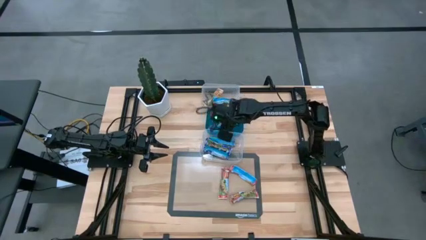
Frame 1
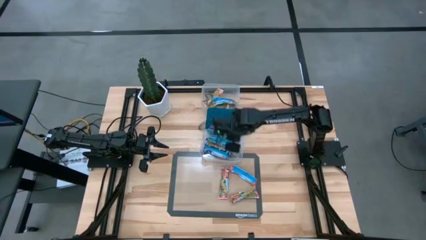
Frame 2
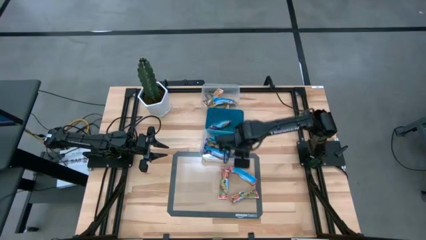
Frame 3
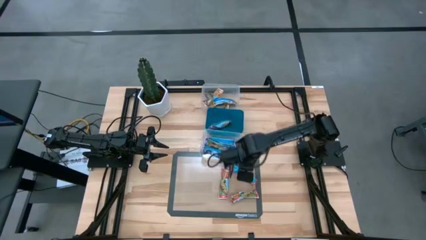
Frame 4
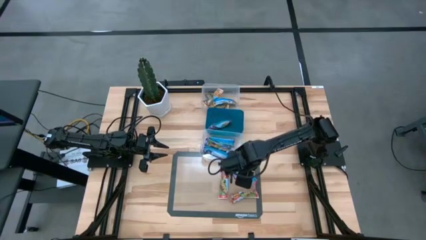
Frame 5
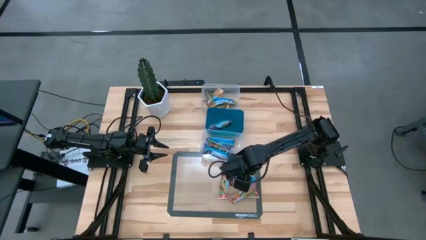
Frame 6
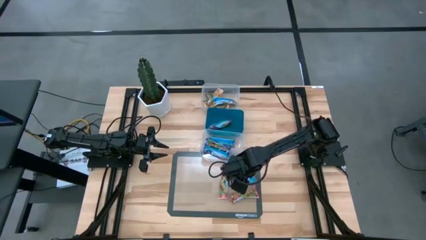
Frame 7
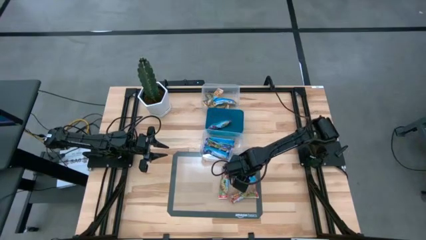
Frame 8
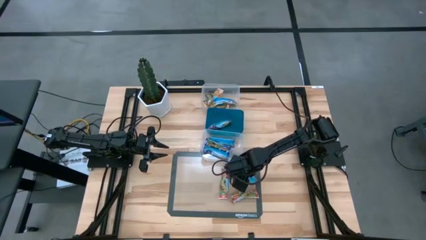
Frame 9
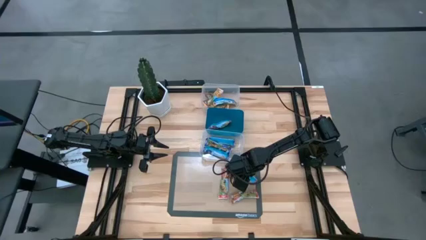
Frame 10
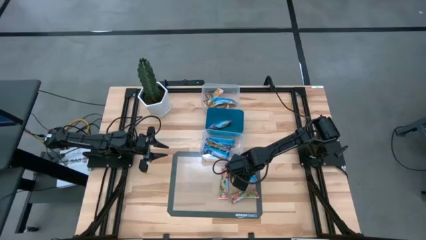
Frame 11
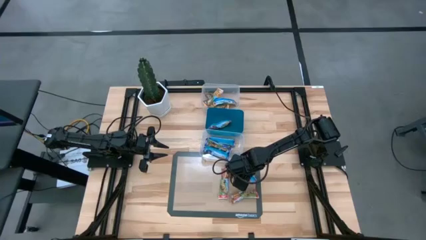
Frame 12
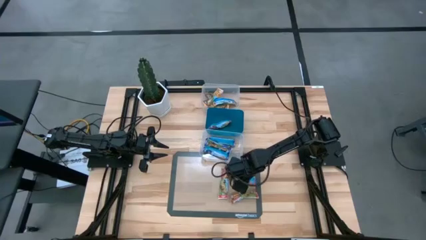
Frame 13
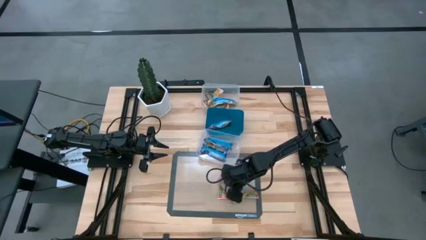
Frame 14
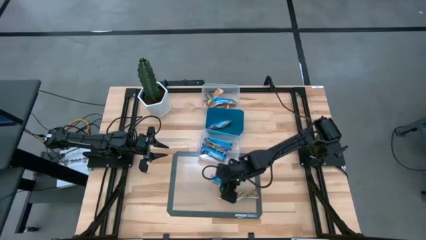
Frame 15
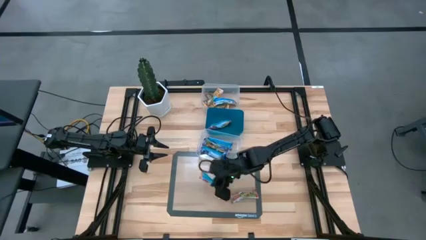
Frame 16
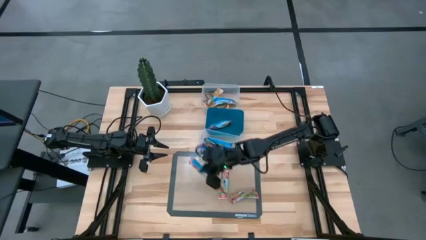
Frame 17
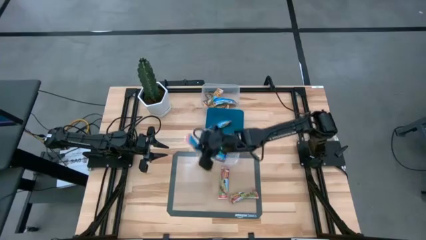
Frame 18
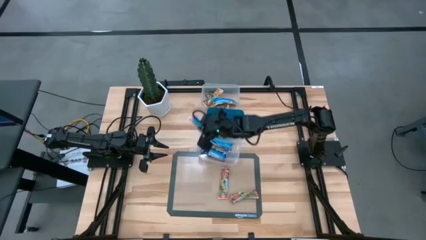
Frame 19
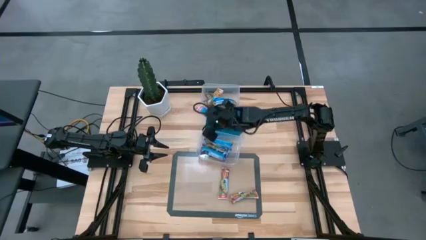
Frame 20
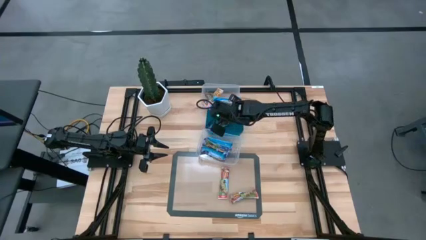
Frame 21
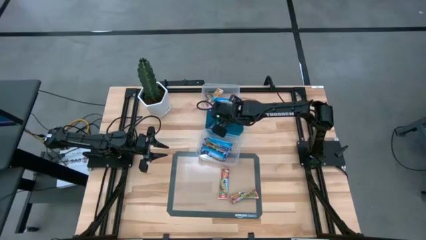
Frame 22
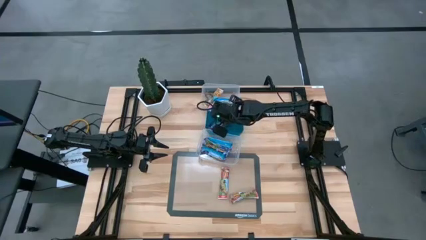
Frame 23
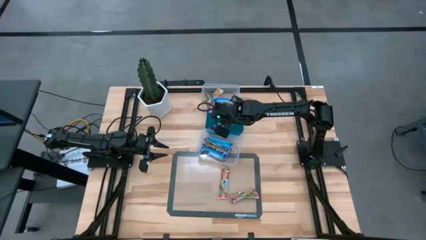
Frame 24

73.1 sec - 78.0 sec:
Task: Pick and place Granola Bars by type
Put the red granola bar into the blue bin

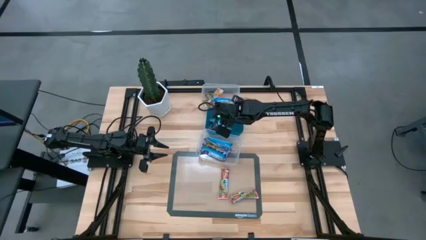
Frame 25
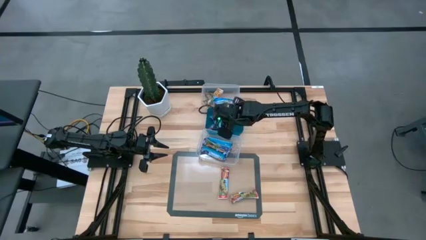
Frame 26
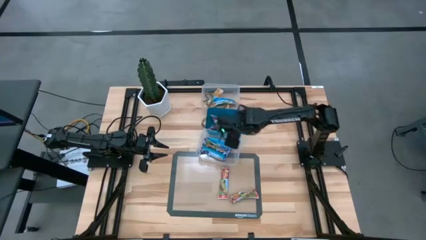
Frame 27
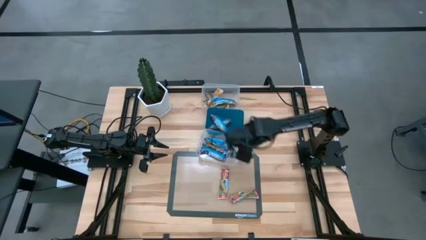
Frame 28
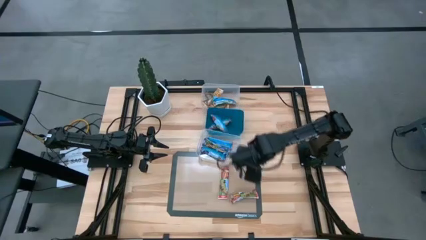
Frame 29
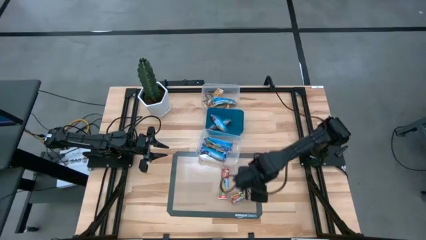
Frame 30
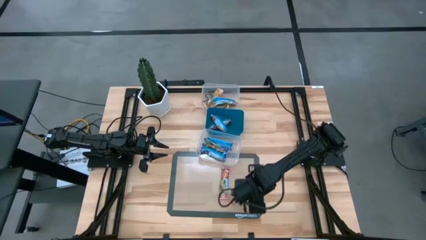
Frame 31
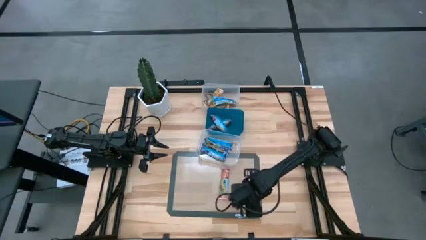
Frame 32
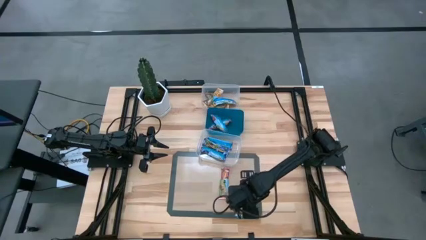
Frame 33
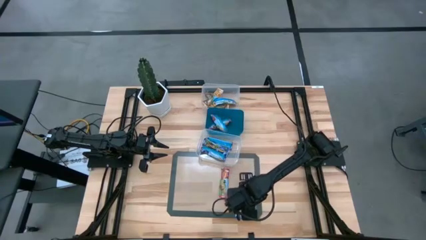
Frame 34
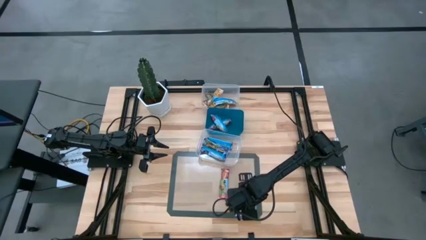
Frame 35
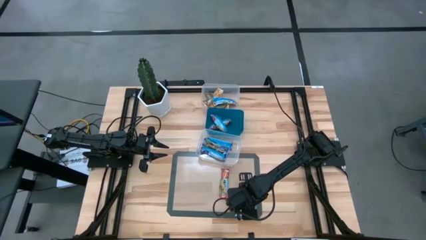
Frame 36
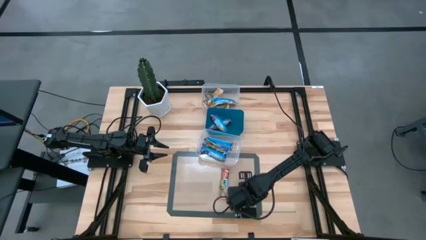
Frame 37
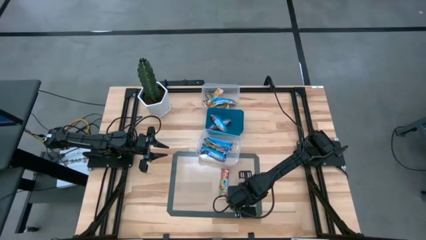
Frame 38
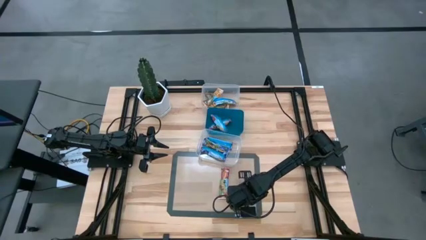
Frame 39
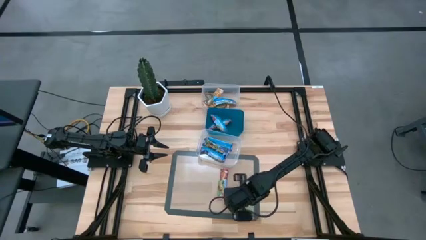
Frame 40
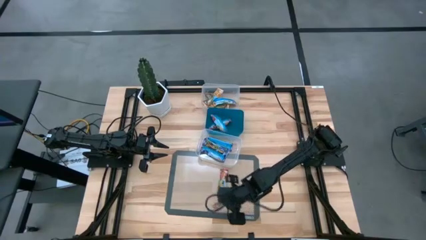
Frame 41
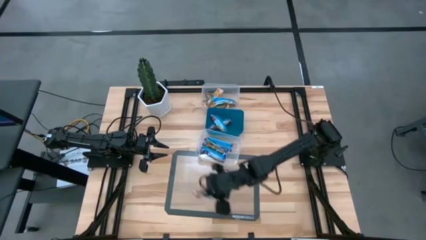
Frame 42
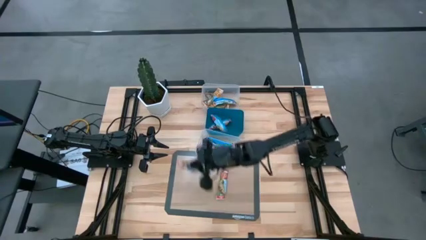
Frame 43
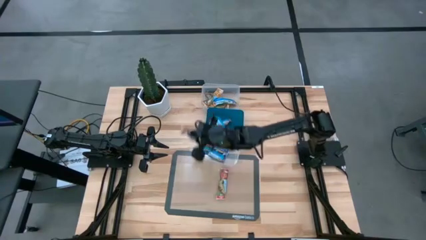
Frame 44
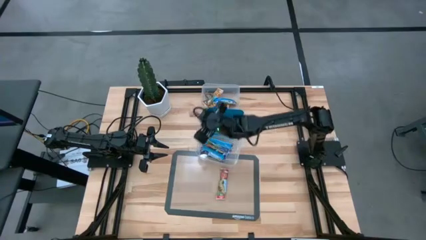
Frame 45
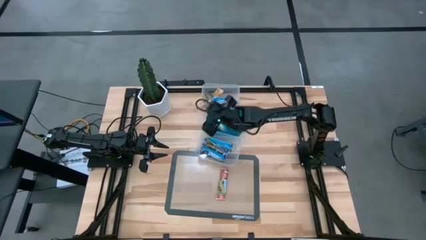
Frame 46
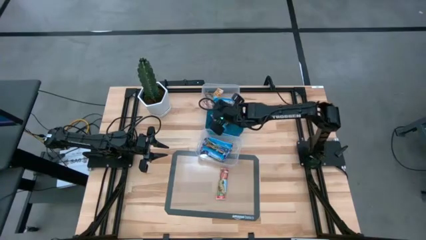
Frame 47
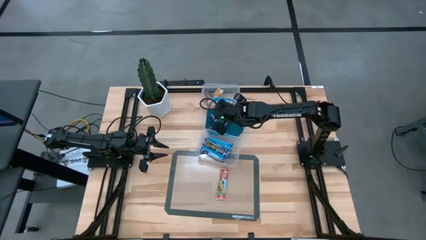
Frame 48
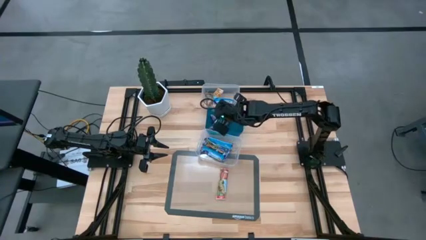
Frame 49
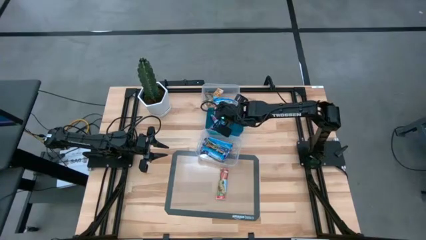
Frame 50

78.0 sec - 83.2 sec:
Put the red granola bar into the blue bin

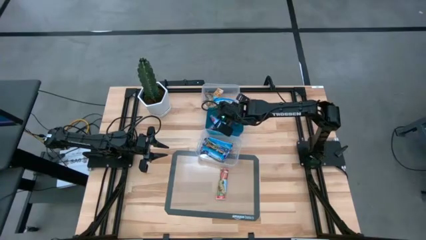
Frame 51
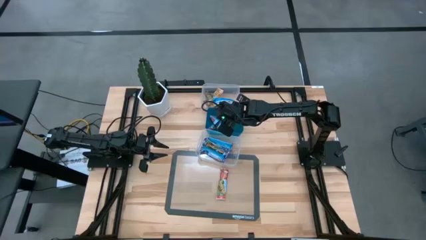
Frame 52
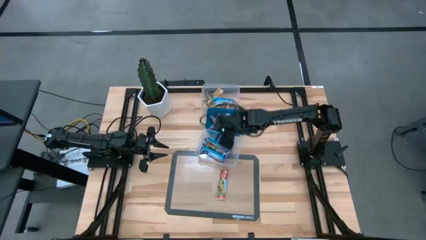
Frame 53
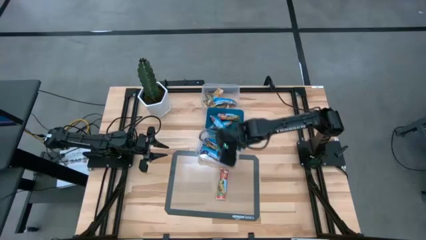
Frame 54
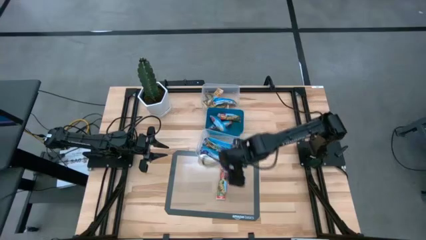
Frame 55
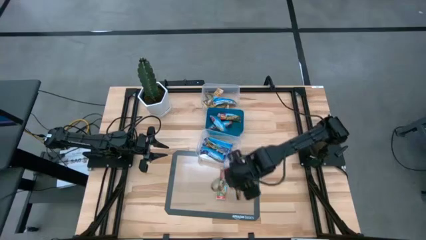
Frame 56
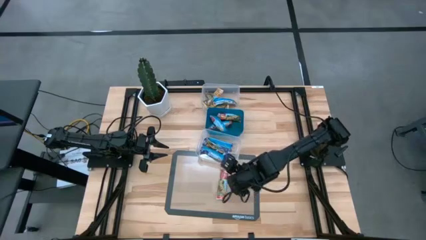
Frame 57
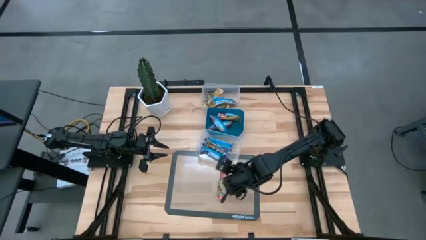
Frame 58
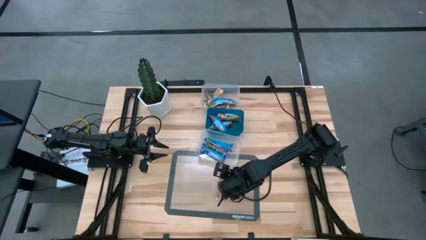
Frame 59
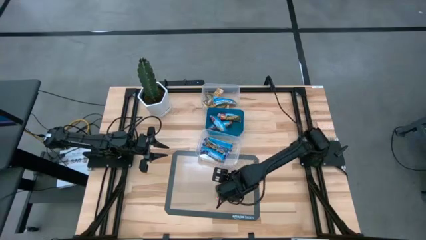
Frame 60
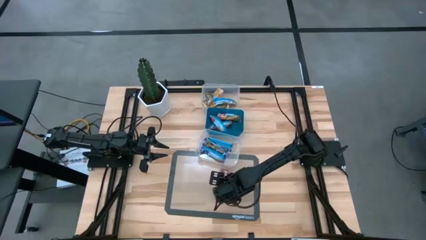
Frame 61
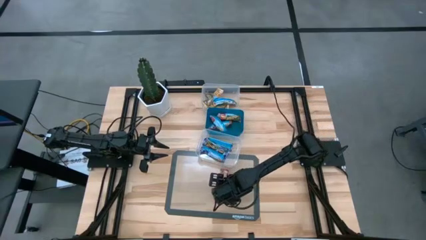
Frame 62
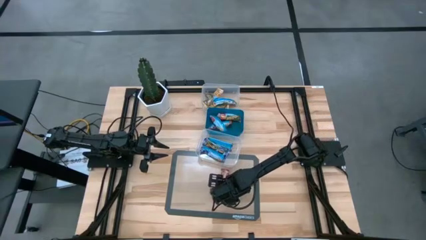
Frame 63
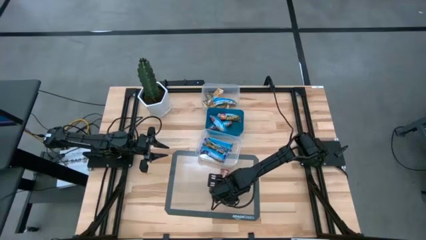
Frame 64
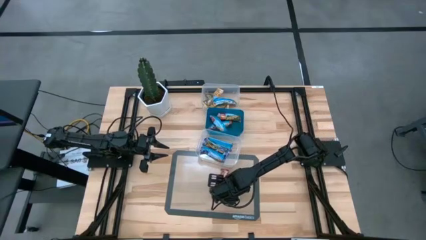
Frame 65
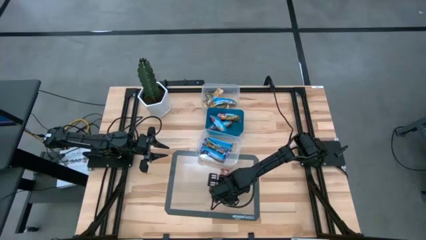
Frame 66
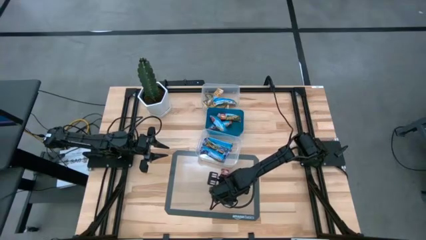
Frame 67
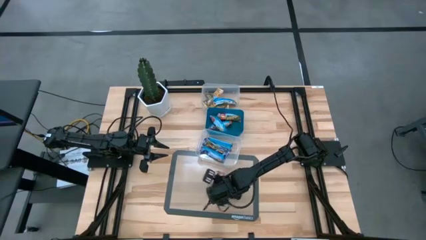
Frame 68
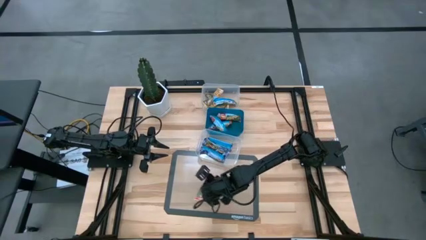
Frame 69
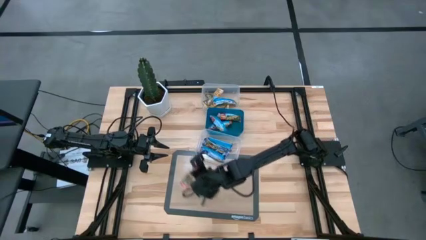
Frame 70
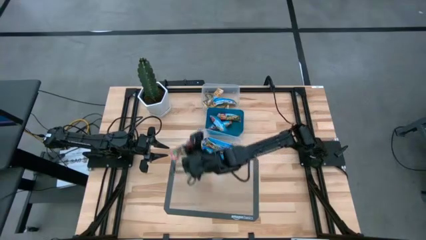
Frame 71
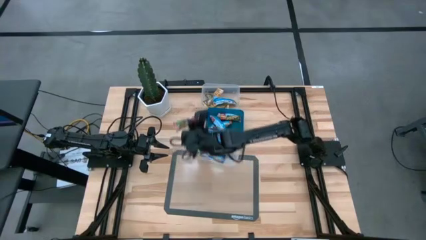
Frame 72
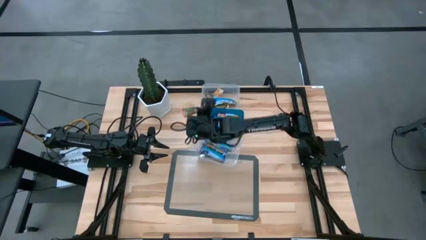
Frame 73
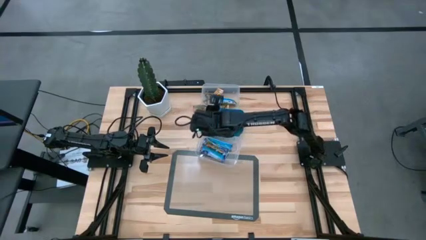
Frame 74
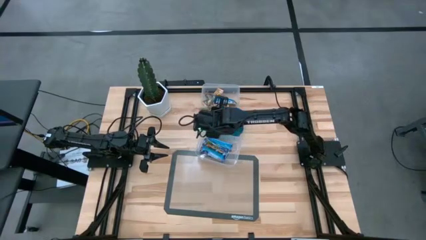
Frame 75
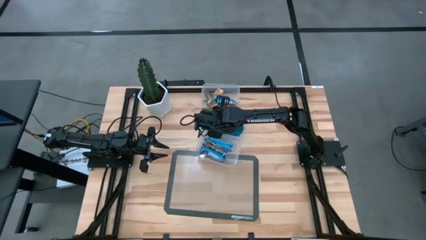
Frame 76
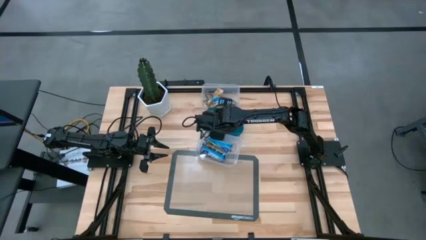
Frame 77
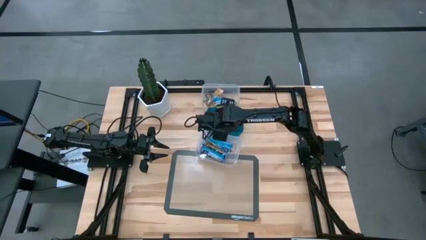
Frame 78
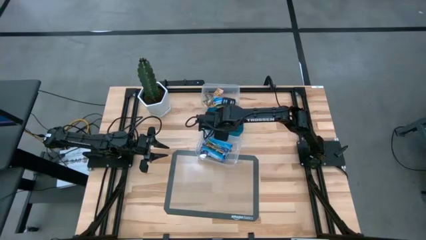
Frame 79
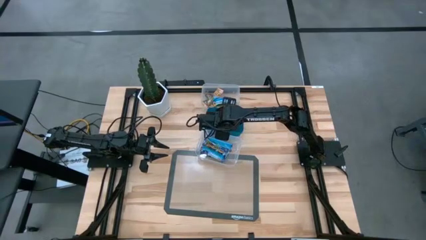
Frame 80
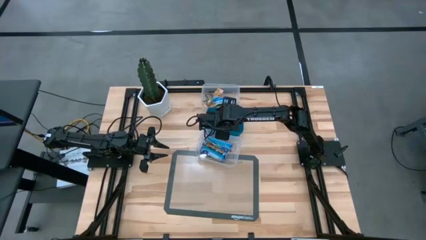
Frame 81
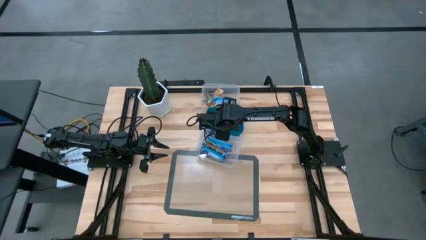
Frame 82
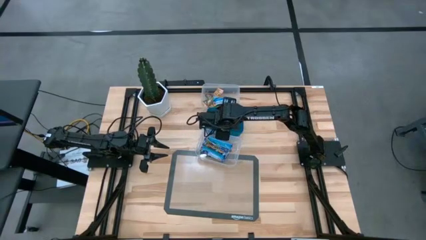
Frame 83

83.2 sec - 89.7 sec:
Put the red granola bar into the blue bin
